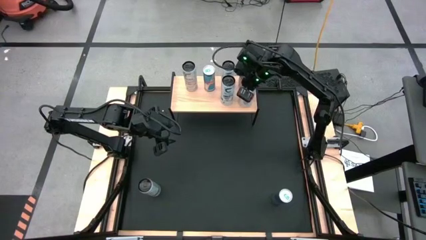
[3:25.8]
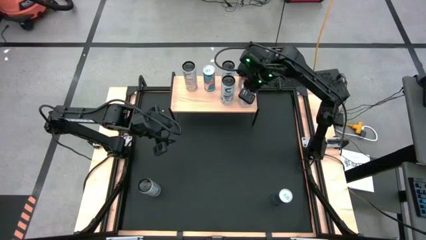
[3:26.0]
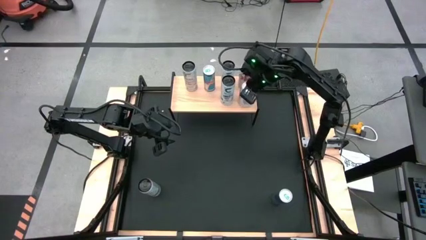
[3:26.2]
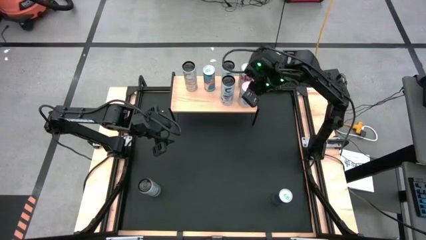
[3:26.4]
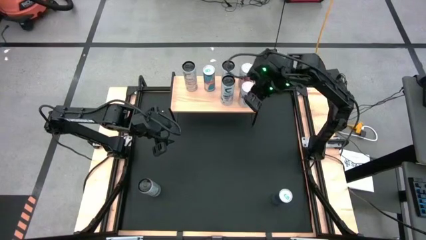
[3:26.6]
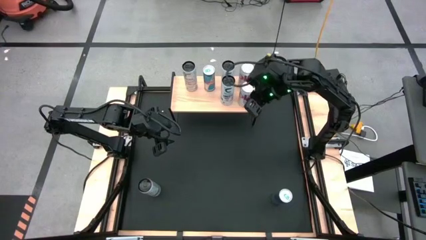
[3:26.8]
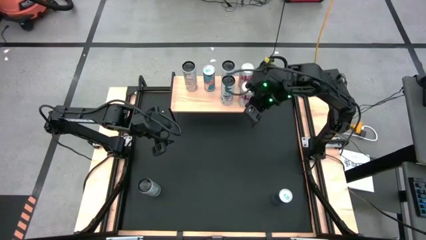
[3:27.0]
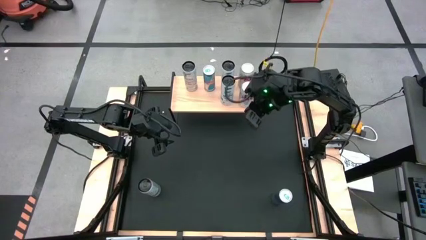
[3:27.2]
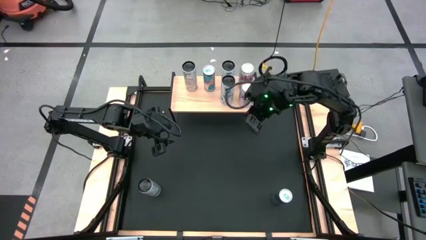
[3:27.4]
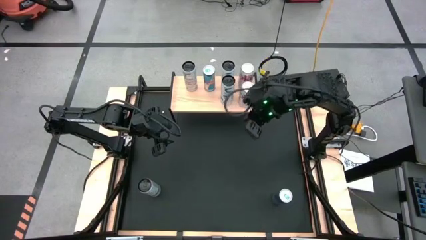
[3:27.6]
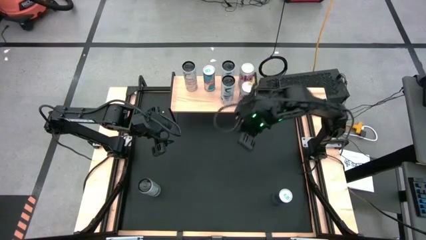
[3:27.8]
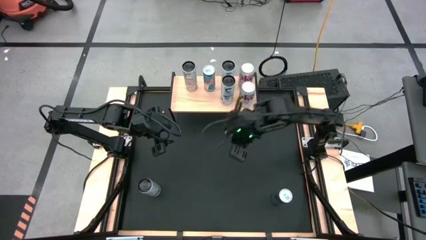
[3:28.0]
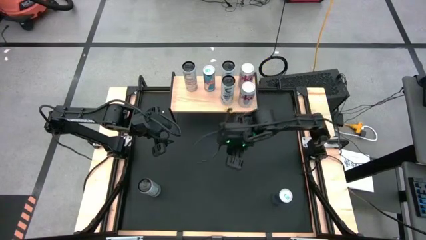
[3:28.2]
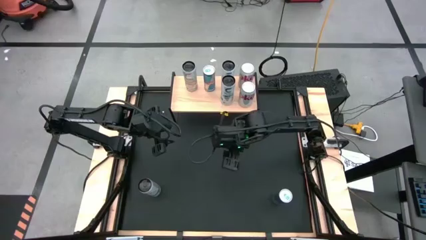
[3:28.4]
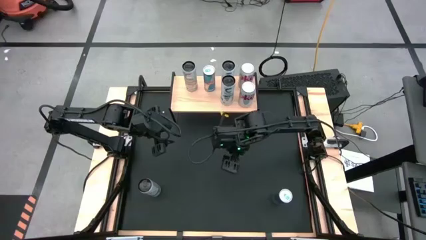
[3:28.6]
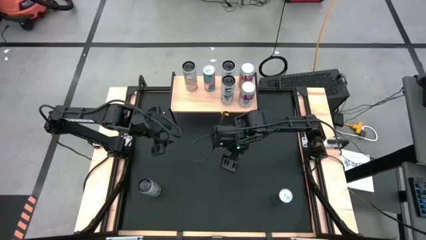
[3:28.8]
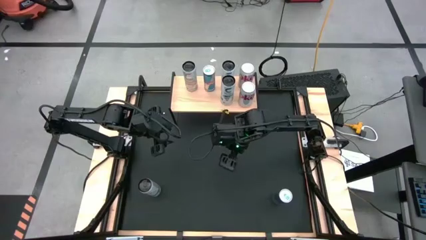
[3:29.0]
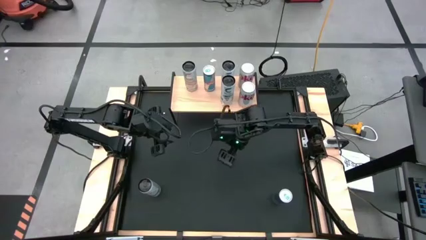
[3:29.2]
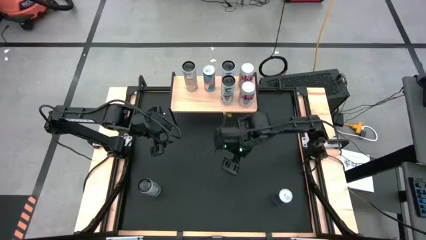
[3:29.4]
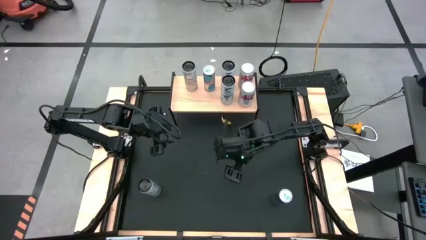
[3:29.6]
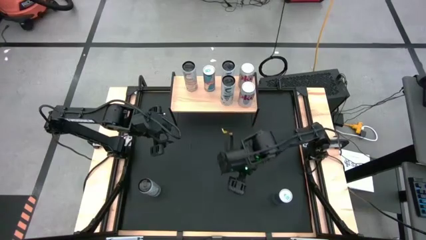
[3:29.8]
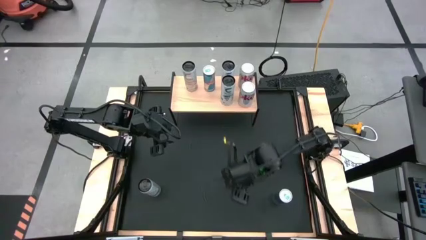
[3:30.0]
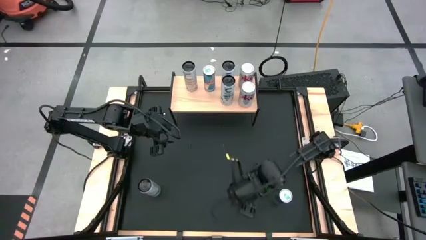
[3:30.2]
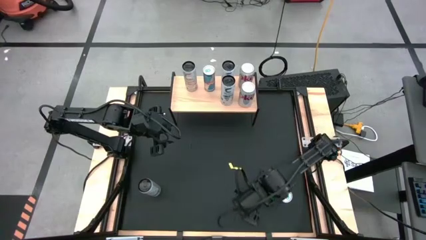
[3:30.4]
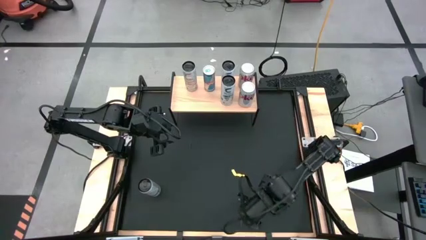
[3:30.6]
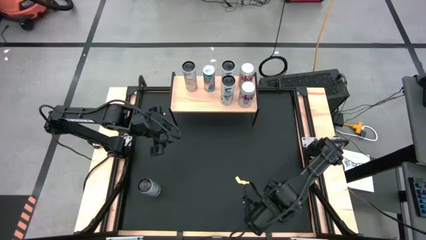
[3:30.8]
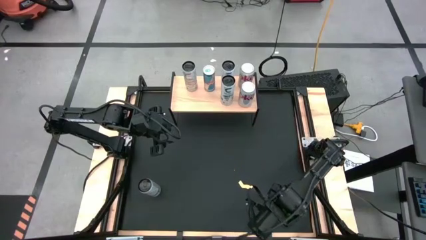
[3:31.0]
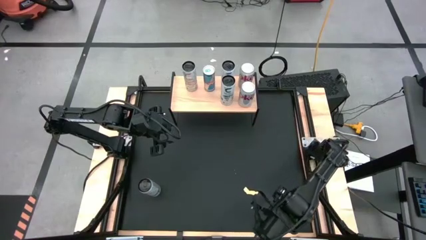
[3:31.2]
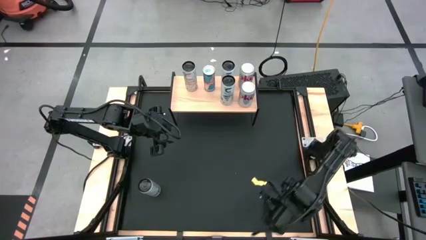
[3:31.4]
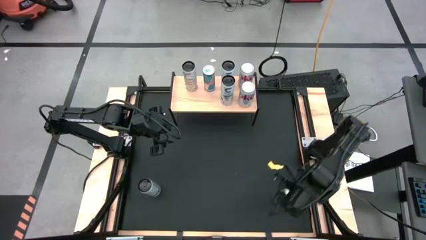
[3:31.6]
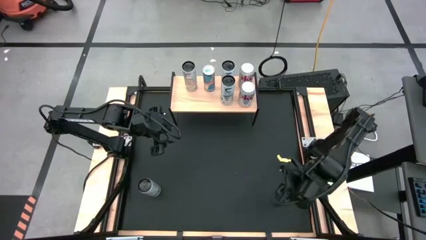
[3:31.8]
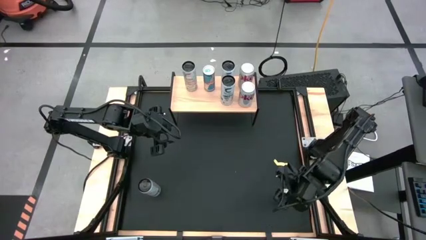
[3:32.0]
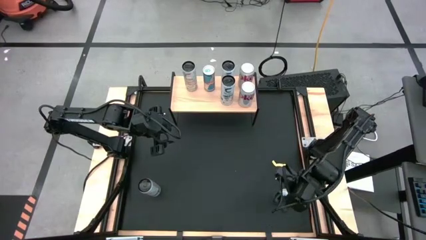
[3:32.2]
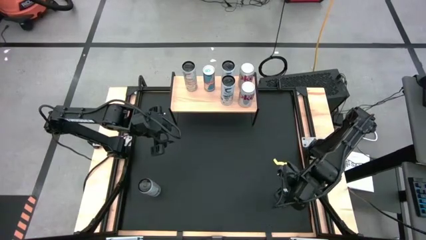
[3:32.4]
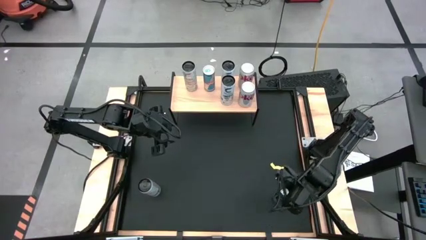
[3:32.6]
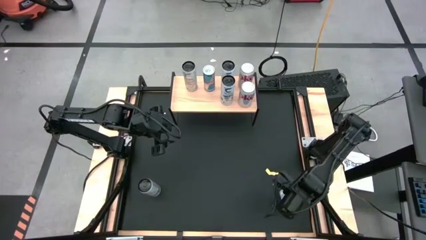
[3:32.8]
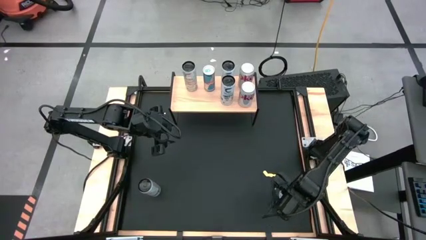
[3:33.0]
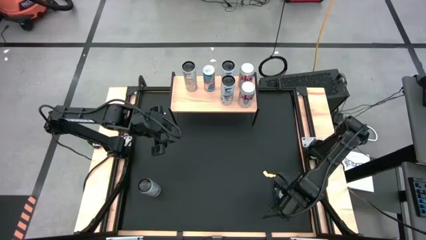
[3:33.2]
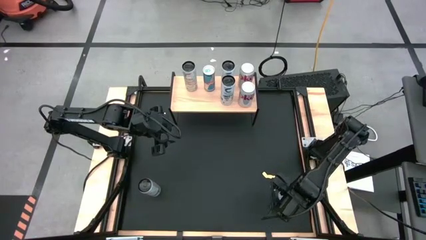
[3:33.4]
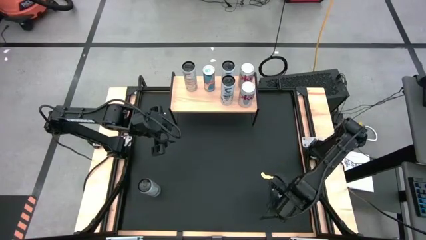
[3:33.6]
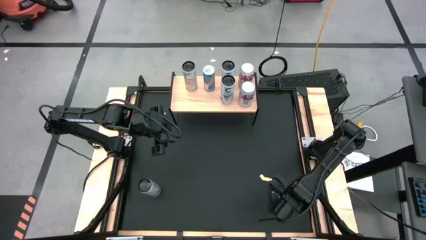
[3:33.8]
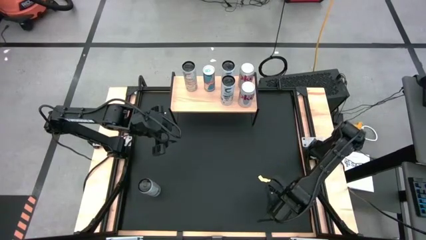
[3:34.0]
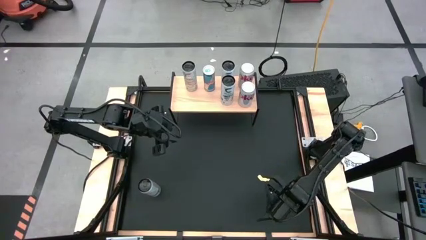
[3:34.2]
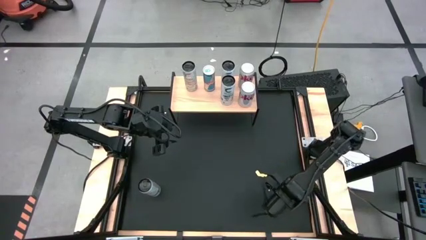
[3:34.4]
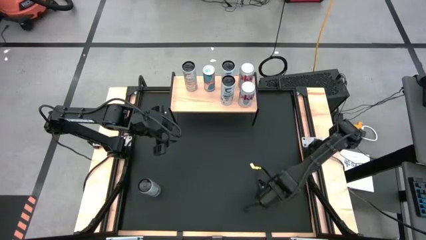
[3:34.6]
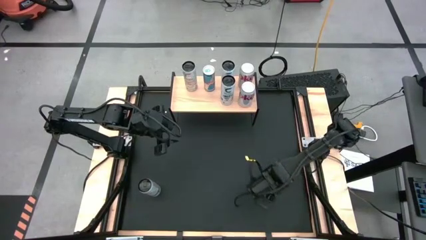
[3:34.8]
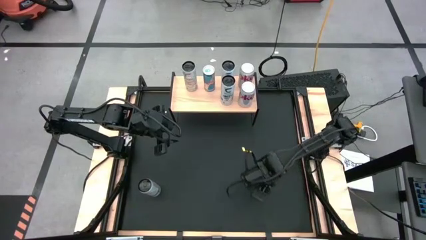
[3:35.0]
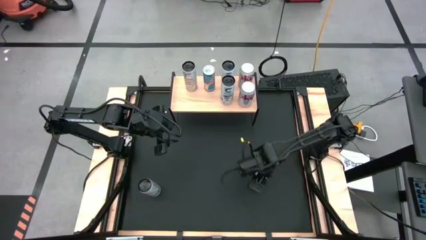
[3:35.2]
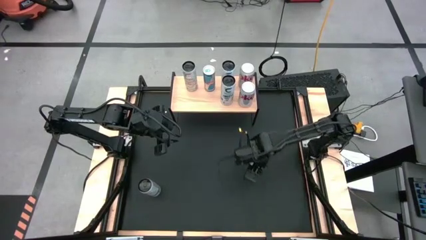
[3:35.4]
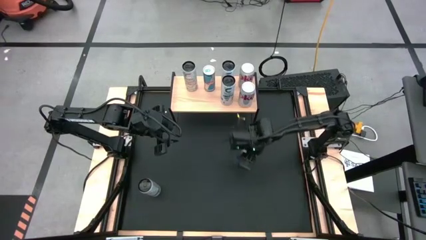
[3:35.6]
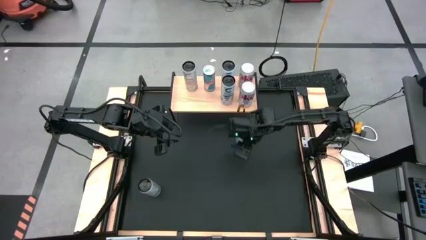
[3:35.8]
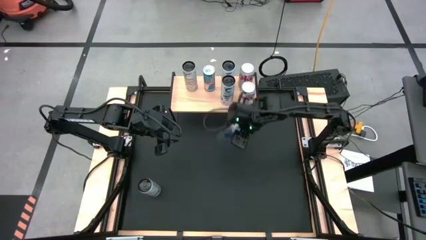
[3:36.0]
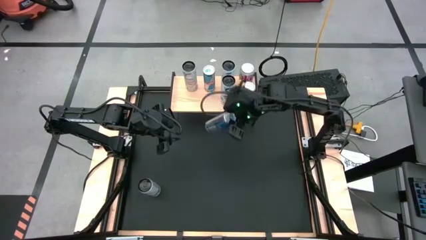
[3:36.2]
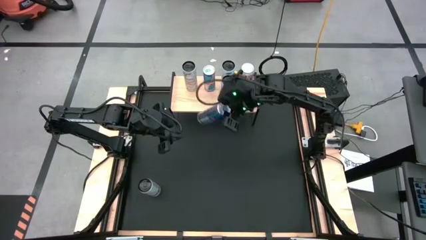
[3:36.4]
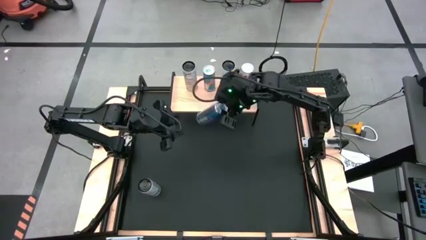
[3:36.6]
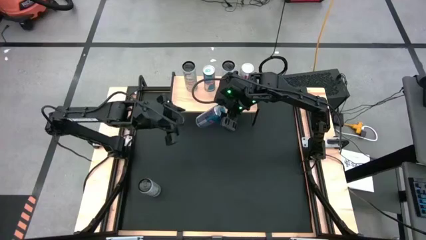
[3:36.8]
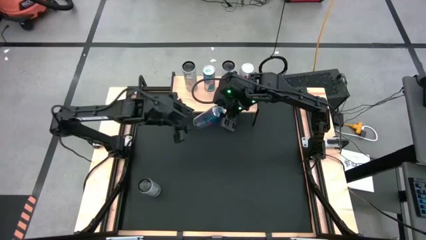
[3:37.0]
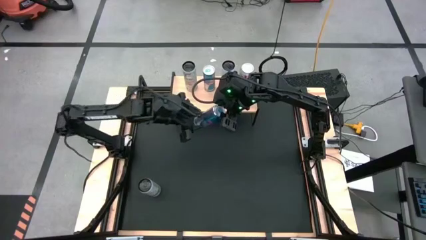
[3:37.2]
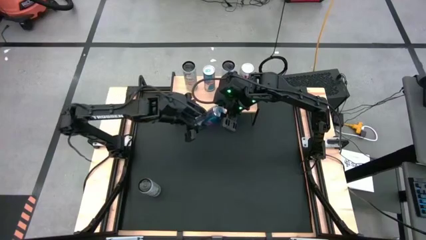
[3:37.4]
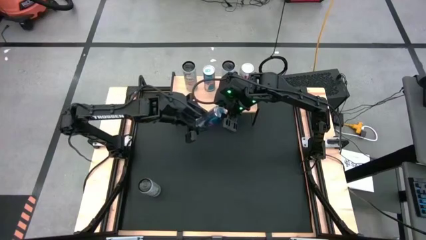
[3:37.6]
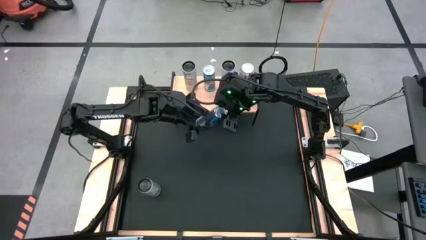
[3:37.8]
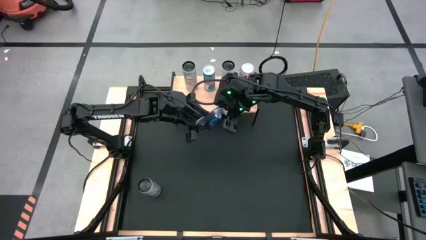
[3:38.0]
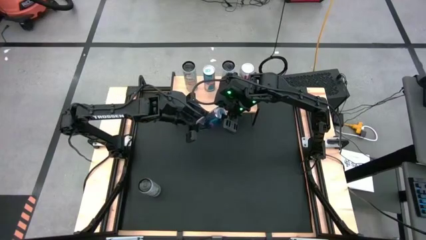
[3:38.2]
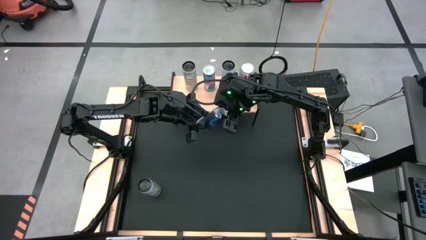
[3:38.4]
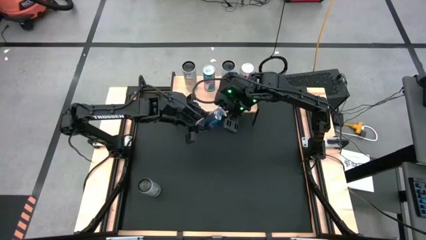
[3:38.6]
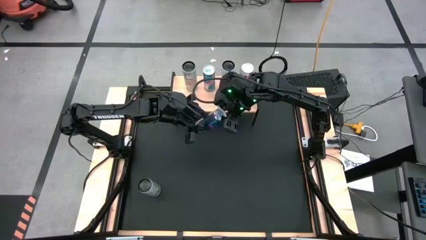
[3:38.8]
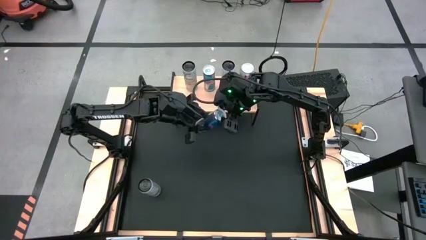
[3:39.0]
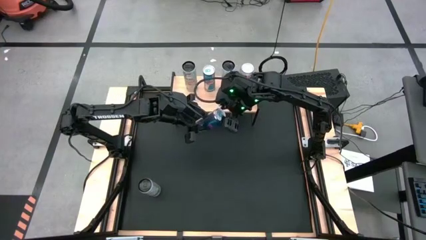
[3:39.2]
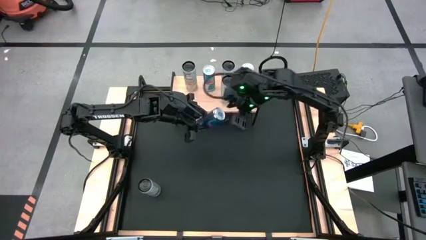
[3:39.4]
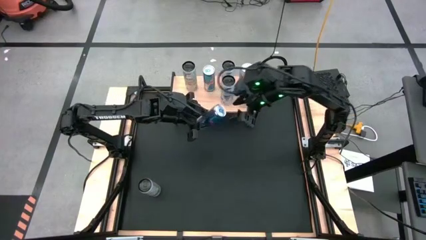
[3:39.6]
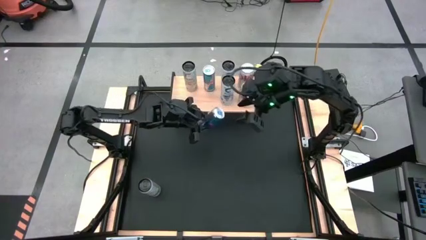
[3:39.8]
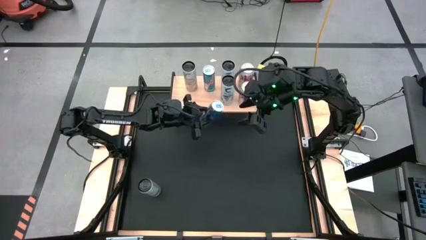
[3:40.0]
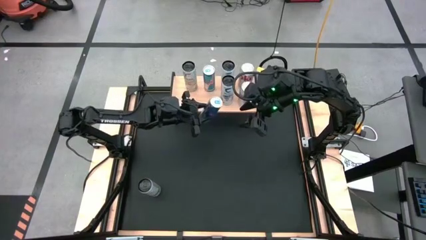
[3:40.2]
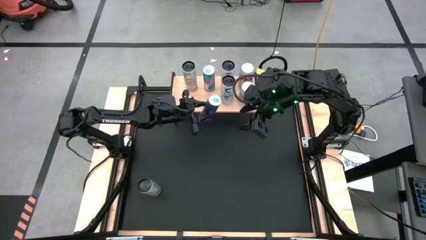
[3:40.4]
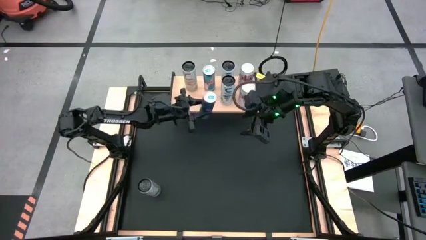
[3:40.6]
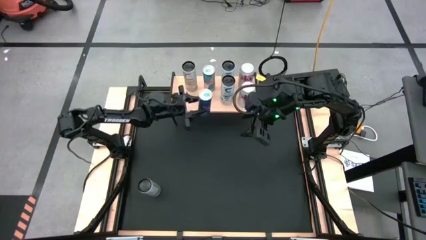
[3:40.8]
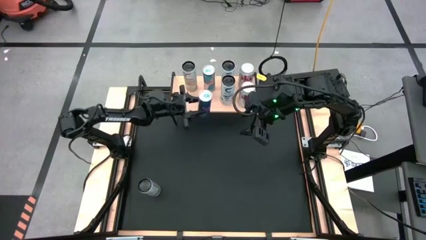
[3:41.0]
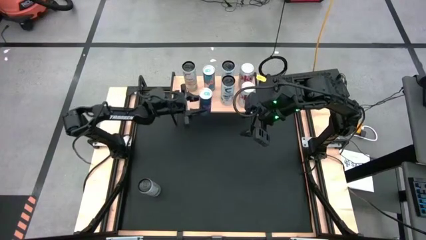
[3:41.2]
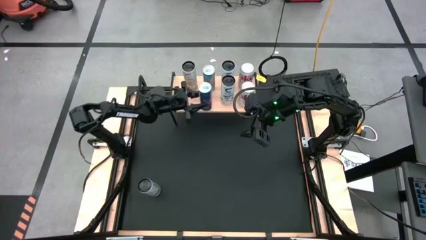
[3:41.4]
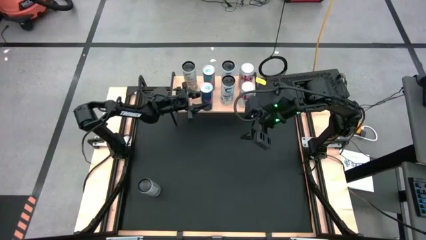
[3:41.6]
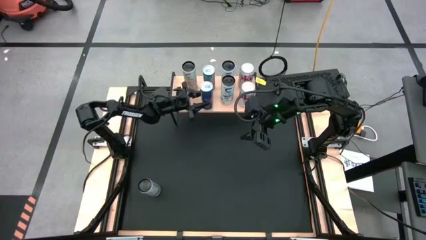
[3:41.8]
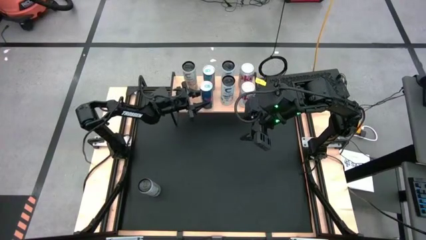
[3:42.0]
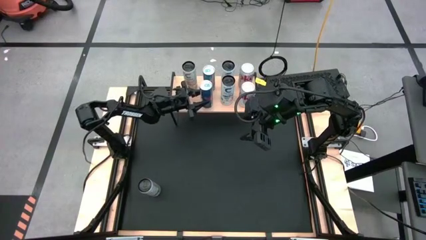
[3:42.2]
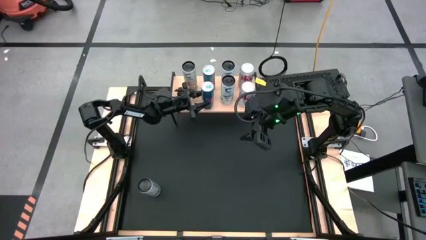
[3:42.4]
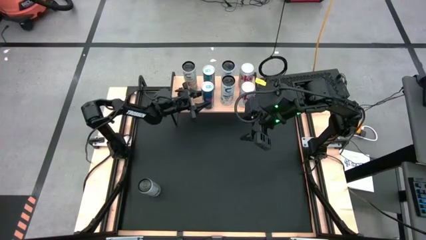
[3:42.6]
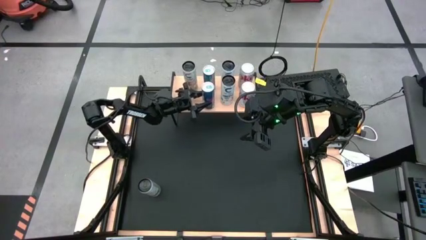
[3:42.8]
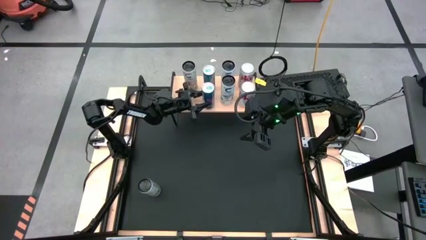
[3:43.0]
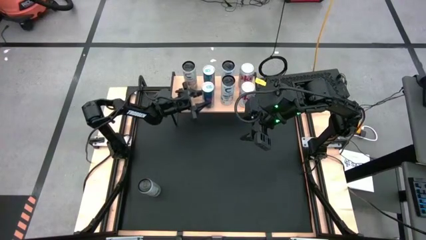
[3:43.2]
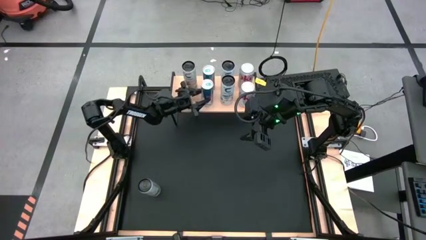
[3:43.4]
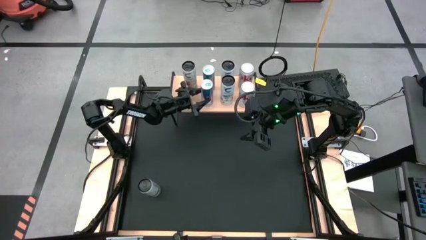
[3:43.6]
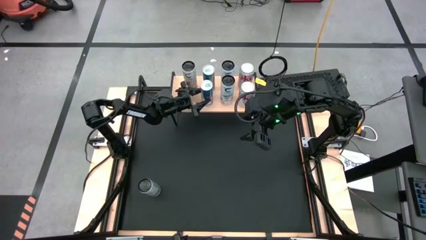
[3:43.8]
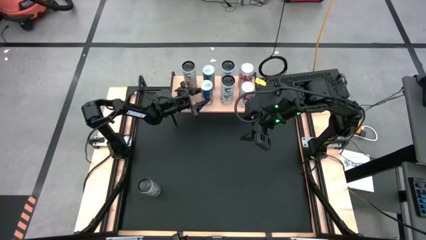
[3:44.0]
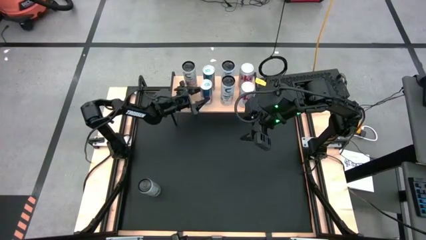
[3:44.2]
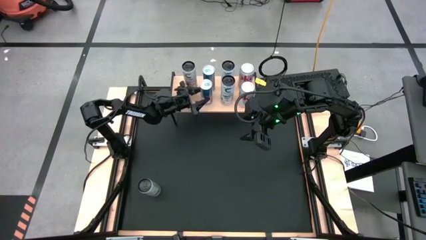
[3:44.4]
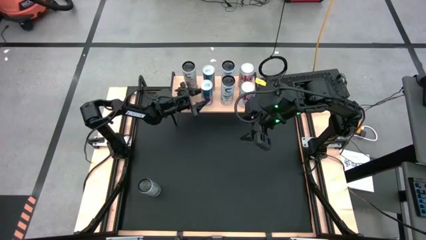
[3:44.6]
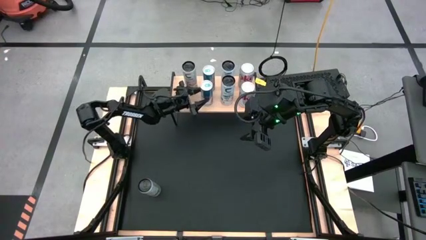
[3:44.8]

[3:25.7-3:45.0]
Task: Place canned beverage on shelf
Put the blue soda can on the shelf
